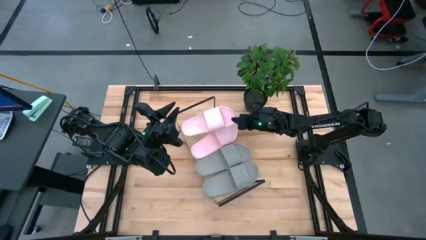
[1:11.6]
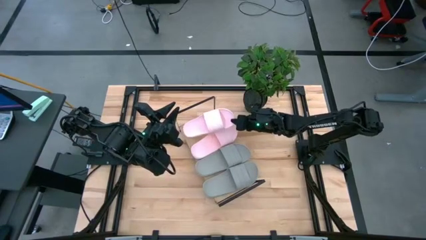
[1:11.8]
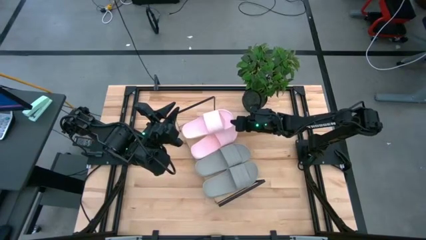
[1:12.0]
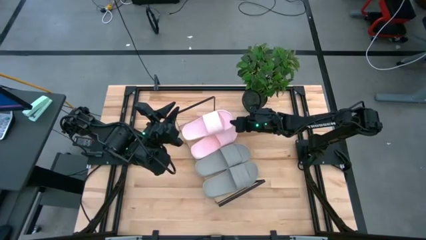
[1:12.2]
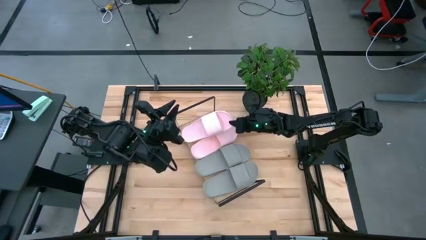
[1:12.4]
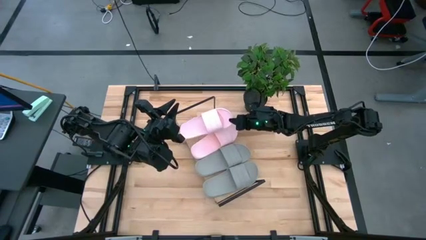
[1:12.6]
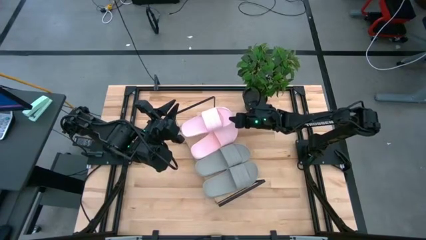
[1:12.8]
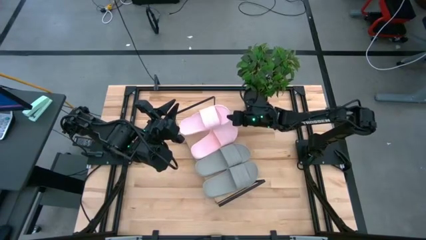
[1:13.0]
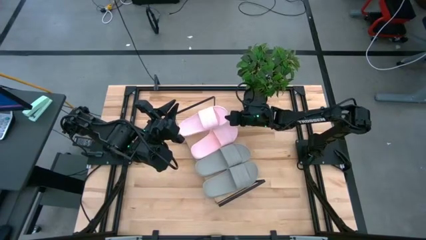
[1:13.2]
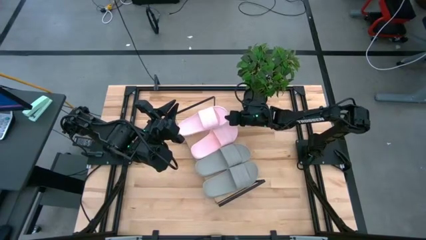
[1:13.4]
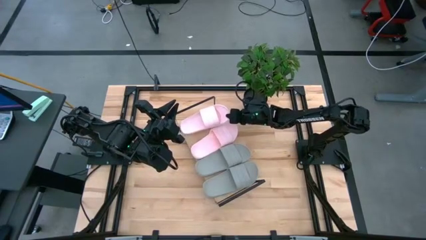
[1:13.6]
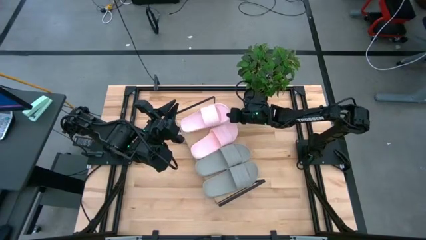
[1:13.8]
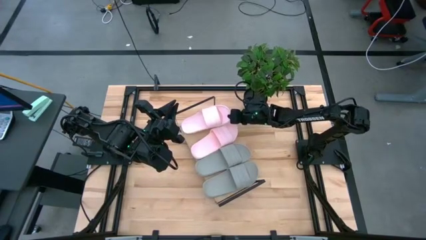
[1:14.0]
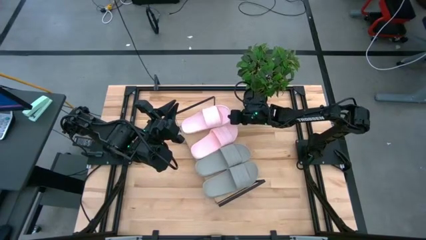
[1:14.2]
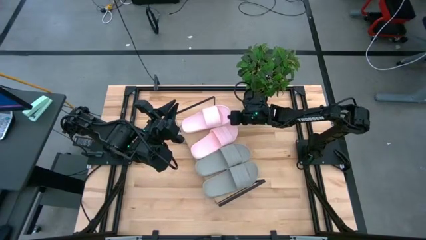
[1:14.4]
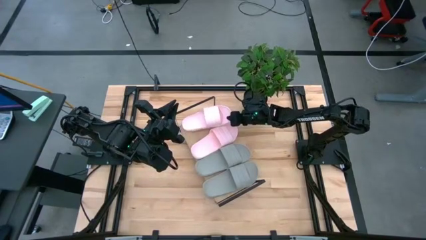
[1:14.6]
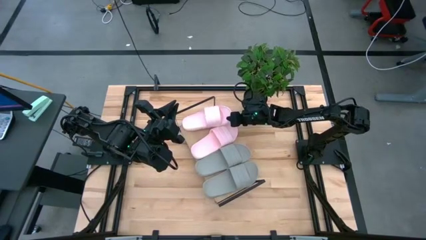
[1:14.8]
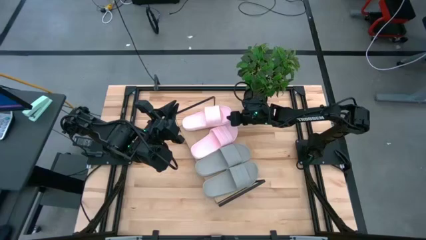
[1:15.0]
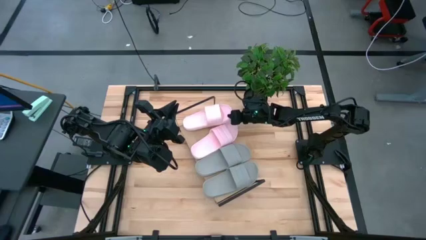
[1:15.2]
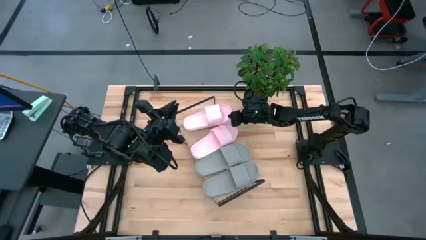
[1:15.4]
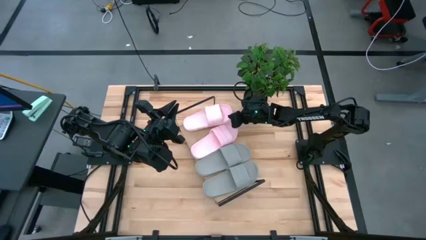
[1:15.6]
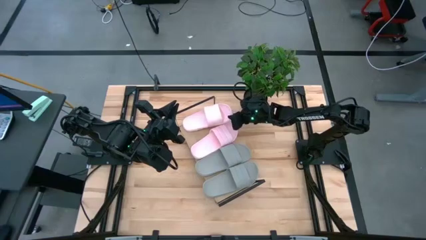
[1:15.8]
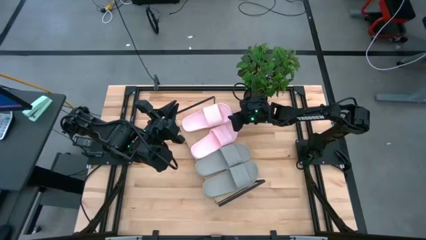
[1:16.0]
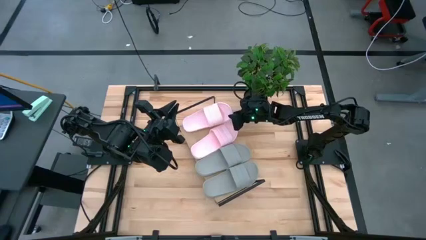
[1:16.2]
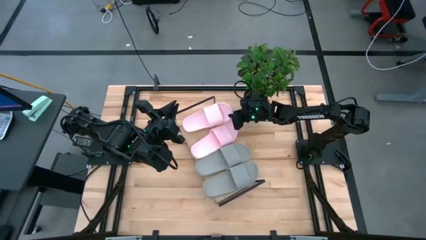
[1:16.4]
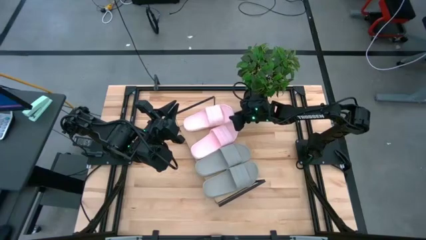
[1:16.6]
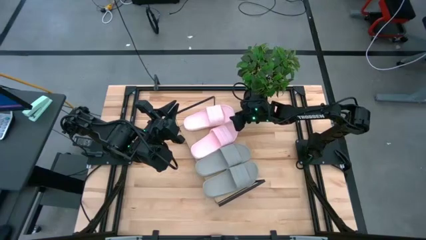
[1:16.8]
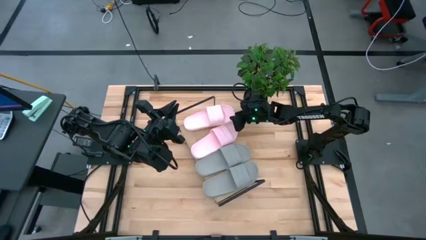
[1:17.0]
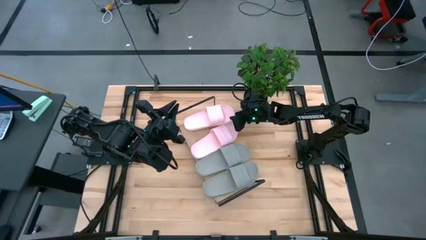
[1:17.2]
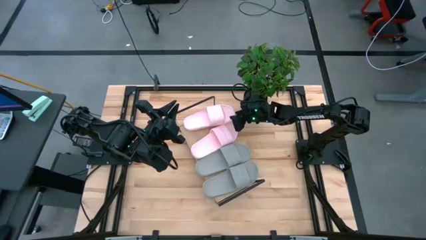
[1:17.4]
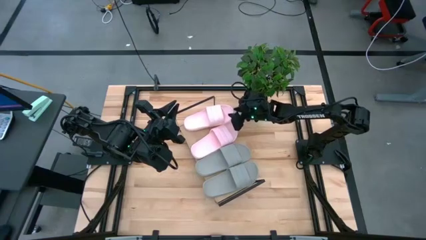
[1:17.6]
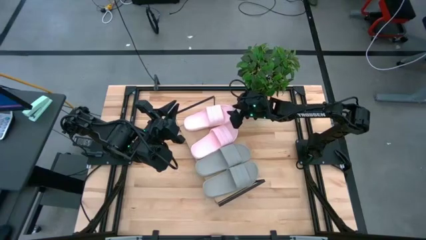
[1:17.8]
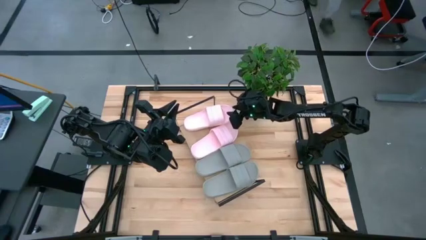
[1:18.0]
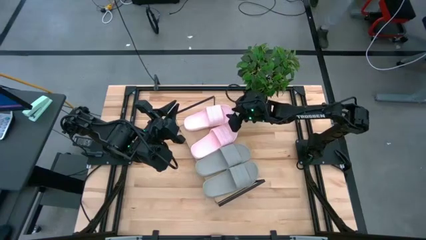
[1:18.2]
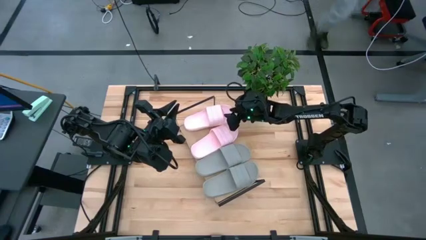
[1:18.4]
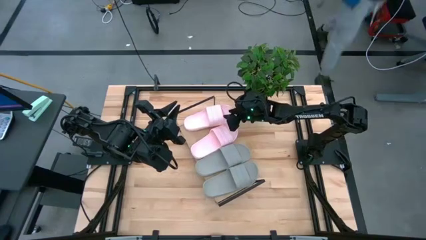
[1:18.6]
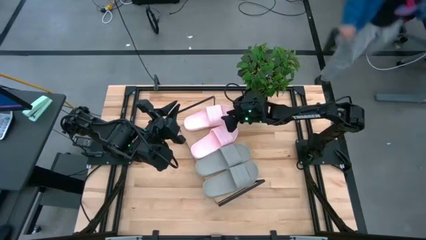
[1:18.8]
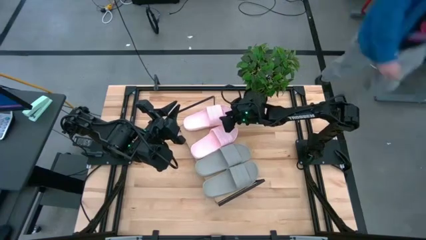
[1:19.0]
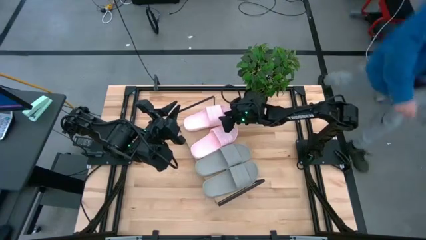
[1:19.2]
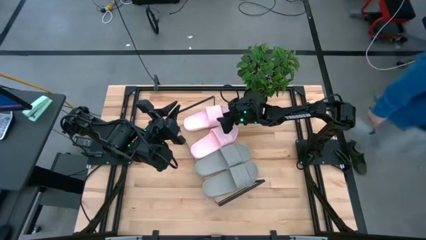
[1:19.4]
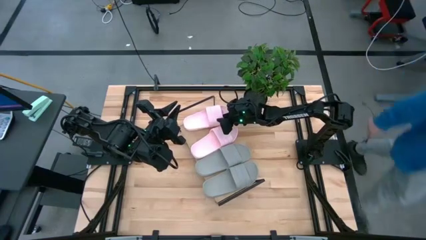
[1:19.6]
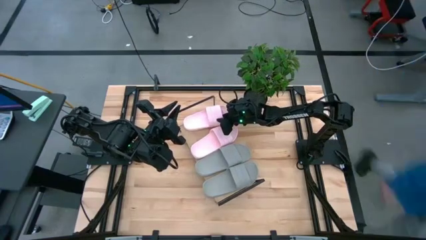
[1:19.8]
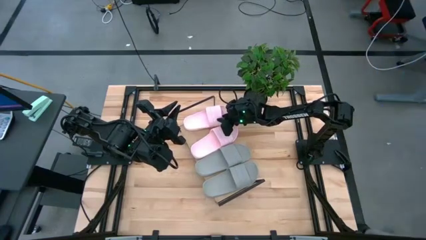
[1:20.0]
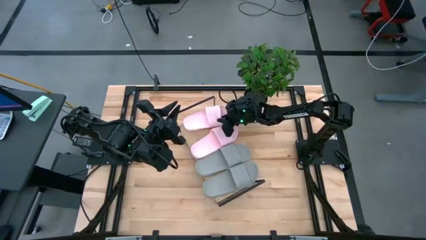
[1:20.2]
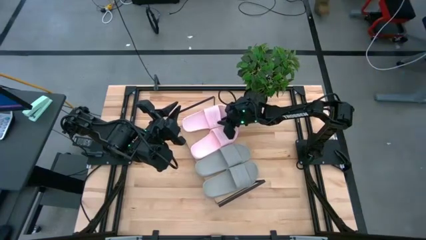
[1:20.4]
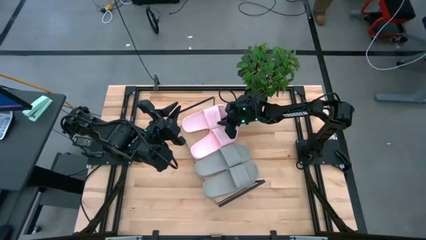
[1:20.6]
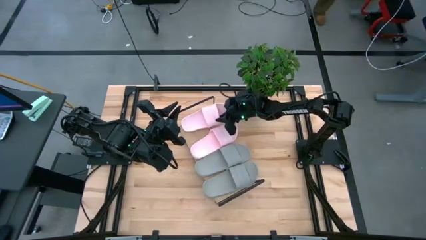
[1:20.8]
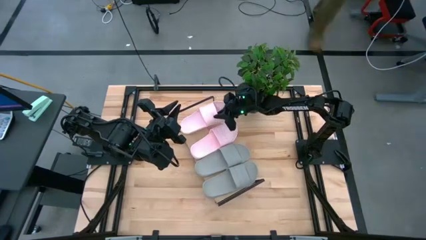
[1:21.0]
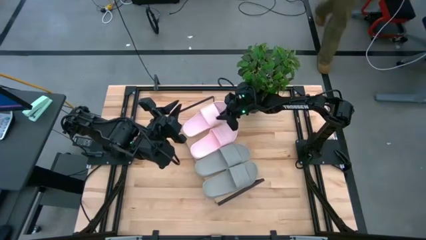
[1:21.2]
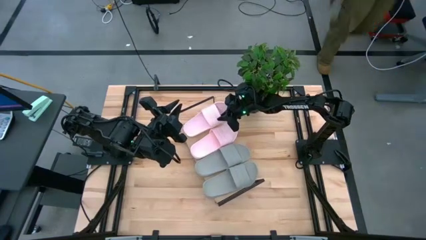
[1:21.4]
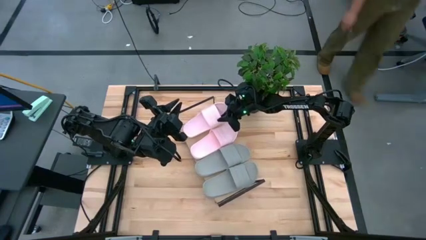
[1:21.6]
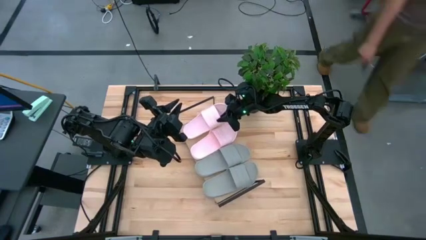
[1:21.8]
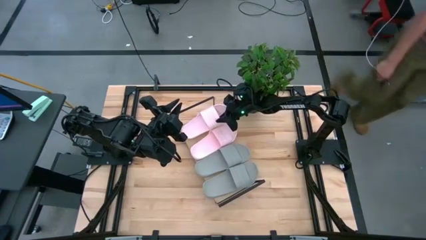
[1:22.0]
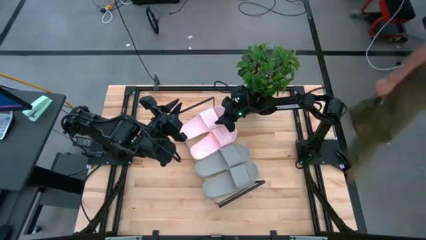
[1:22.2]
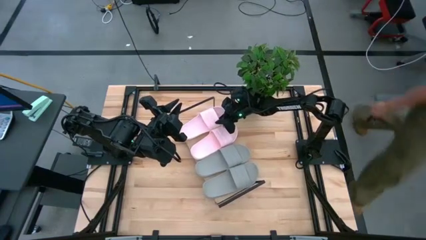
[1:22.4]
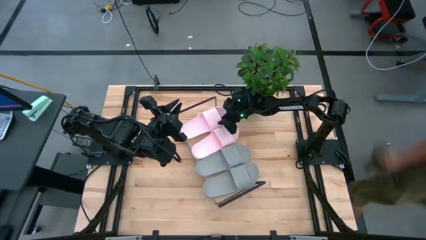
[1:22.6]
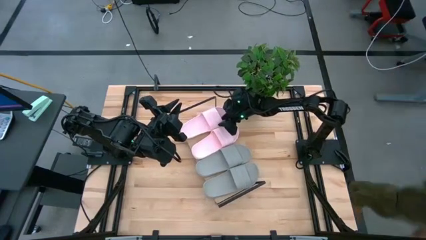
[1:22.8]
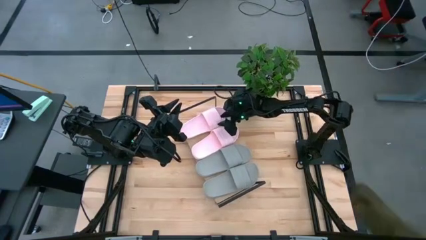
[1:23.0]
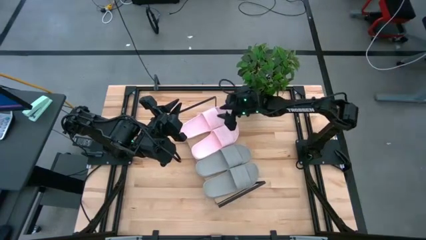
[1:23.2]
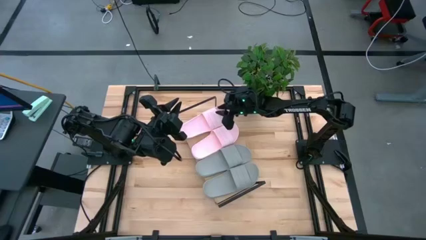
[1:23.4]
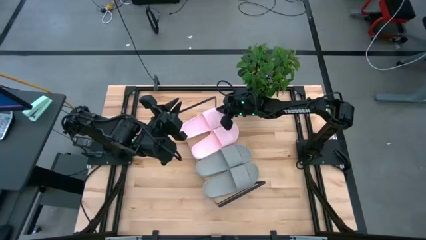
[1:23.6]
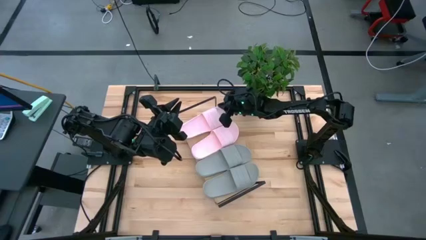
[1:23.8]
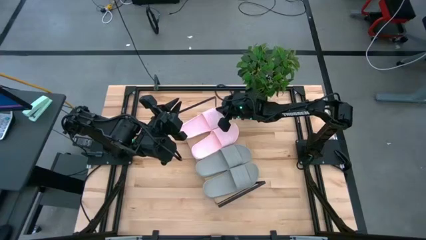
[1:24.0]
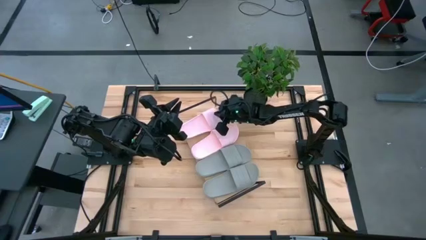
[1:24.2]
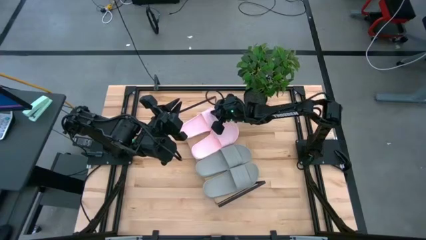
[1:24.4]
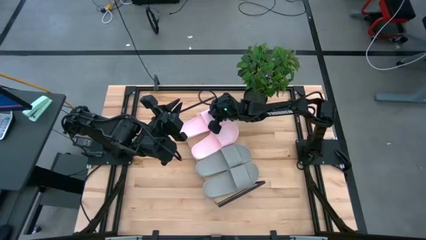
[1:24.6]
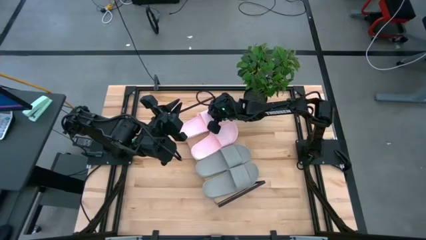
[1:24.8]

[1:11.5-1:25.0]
Task: Pick and place slides into the shelf
Put the pink slide on the shelf
